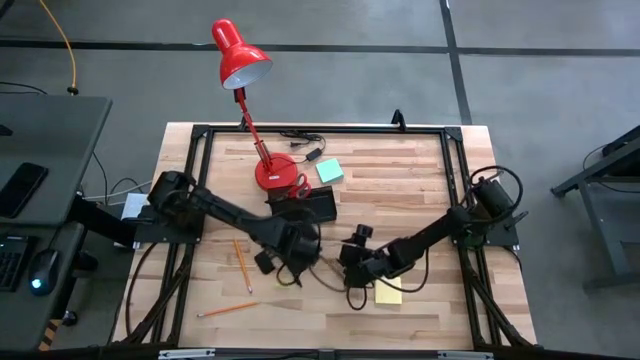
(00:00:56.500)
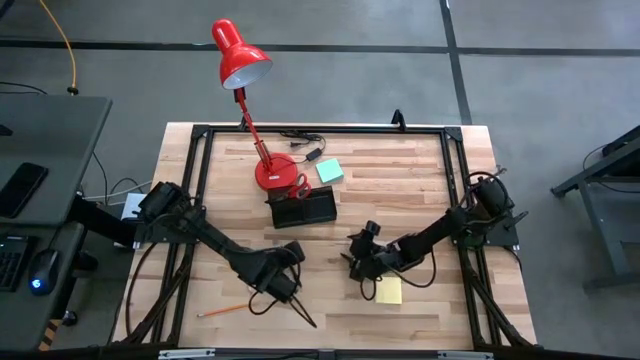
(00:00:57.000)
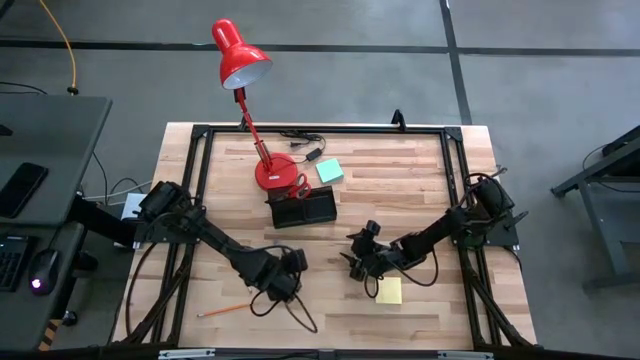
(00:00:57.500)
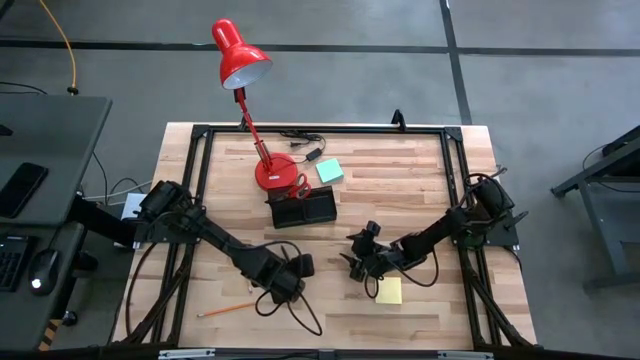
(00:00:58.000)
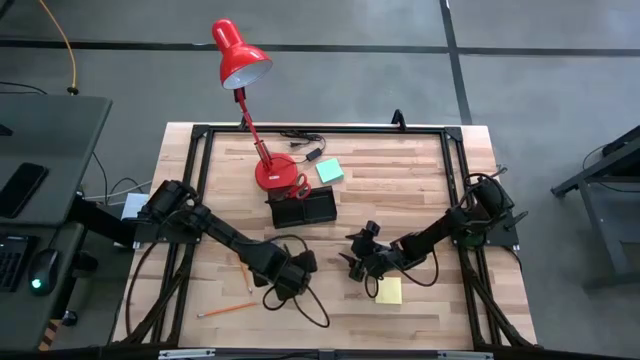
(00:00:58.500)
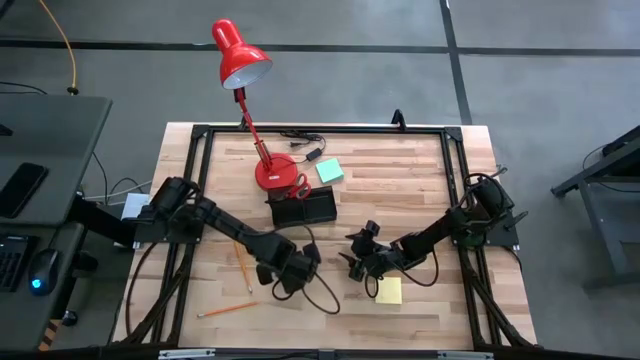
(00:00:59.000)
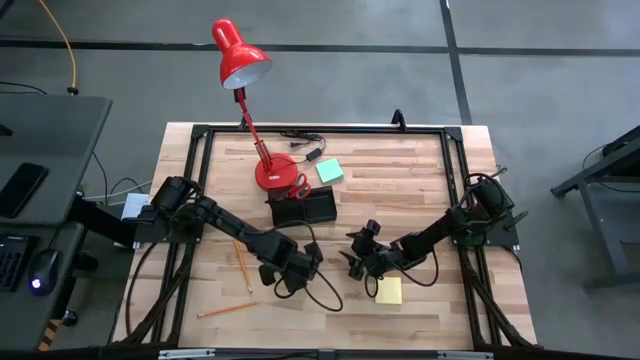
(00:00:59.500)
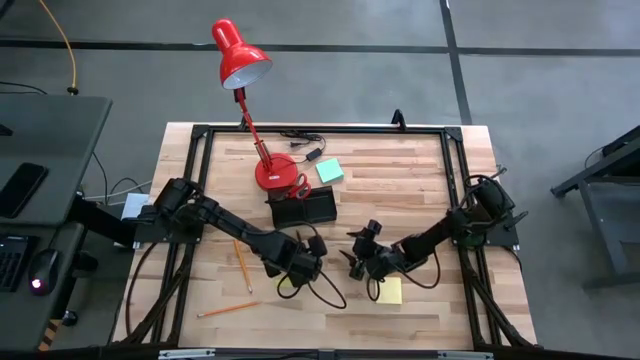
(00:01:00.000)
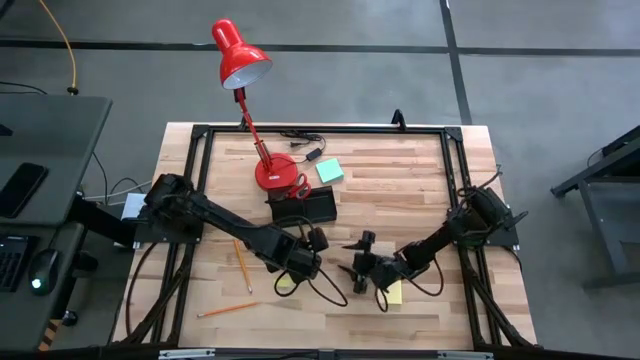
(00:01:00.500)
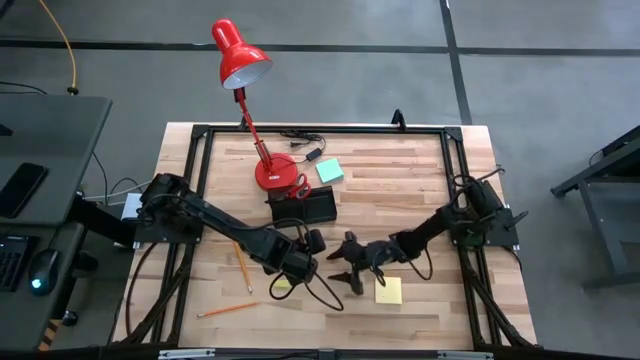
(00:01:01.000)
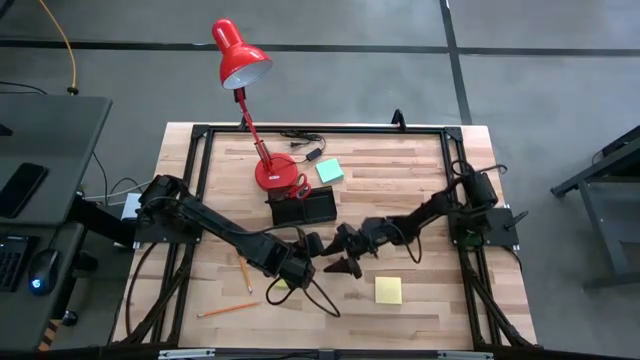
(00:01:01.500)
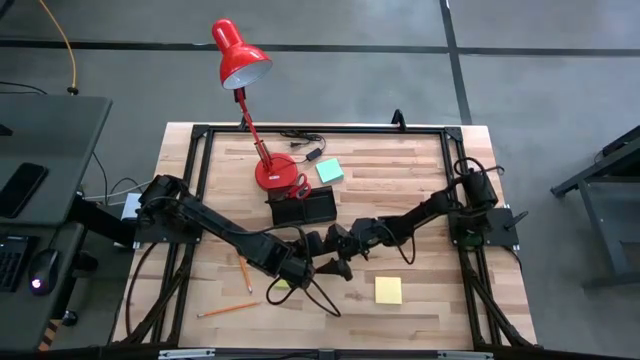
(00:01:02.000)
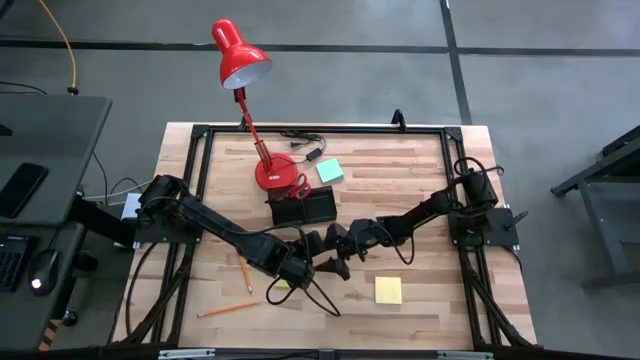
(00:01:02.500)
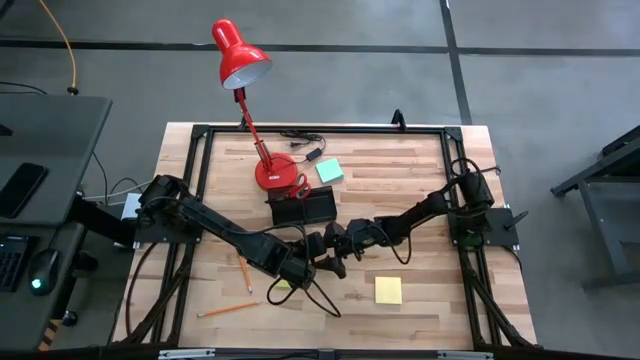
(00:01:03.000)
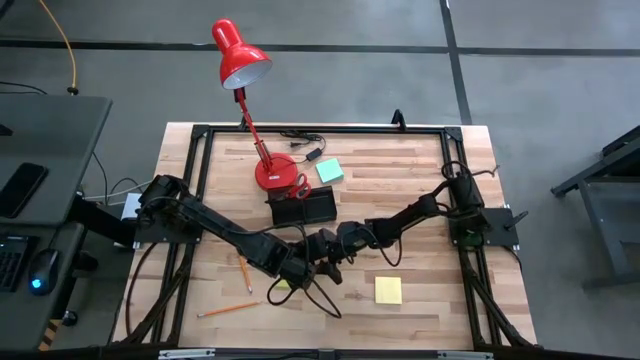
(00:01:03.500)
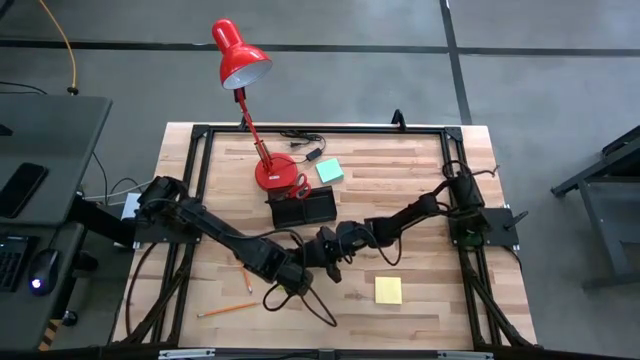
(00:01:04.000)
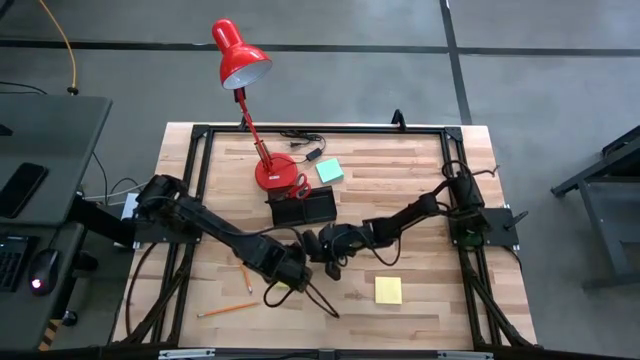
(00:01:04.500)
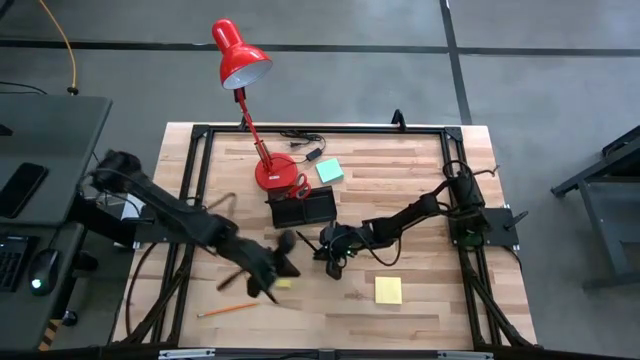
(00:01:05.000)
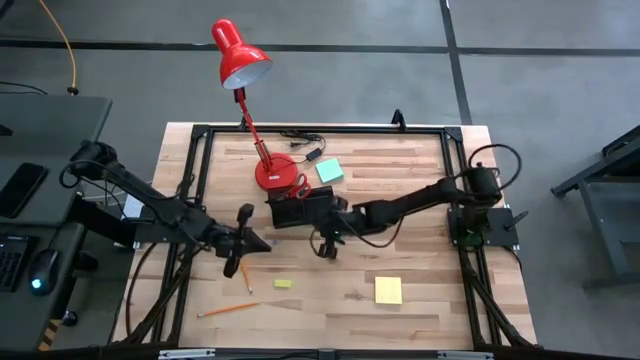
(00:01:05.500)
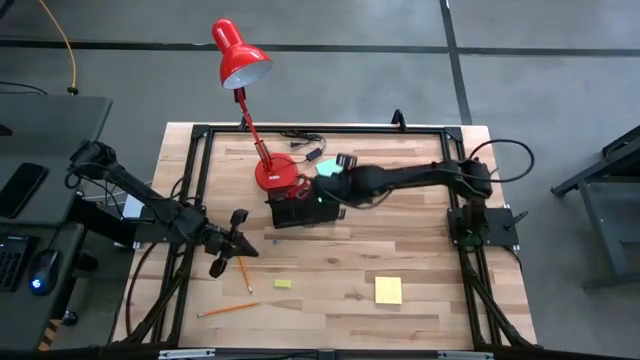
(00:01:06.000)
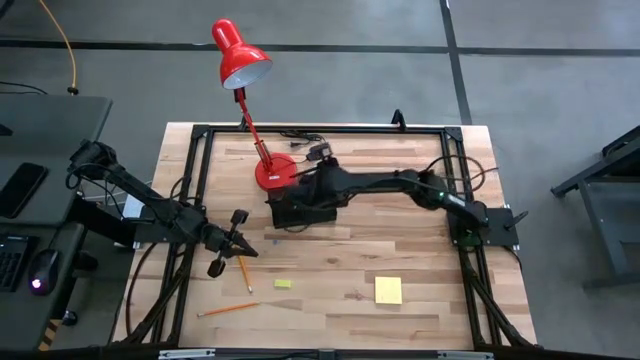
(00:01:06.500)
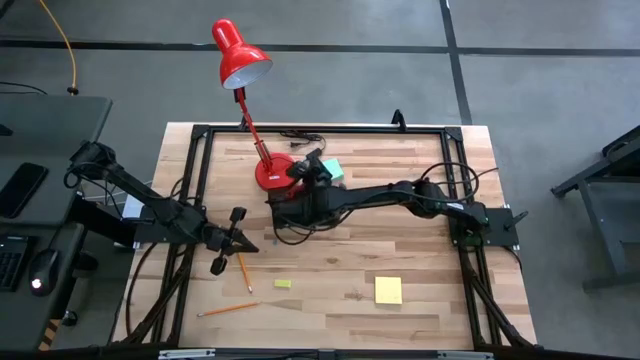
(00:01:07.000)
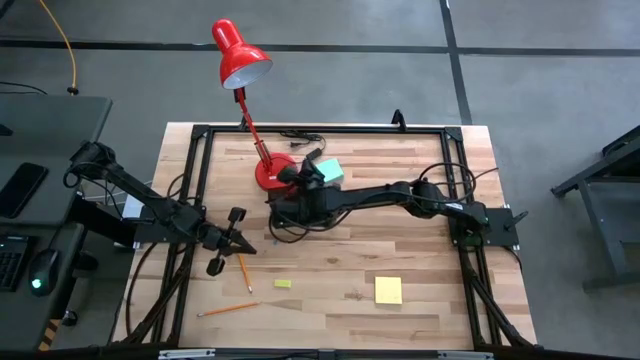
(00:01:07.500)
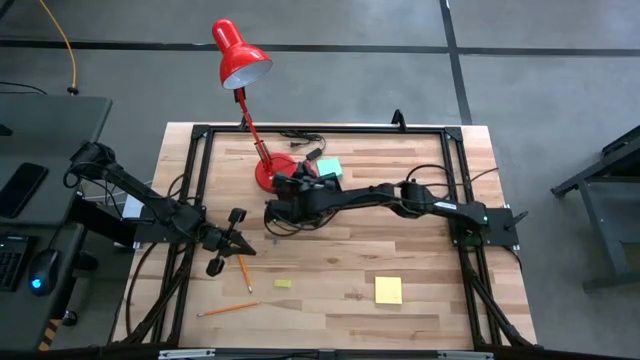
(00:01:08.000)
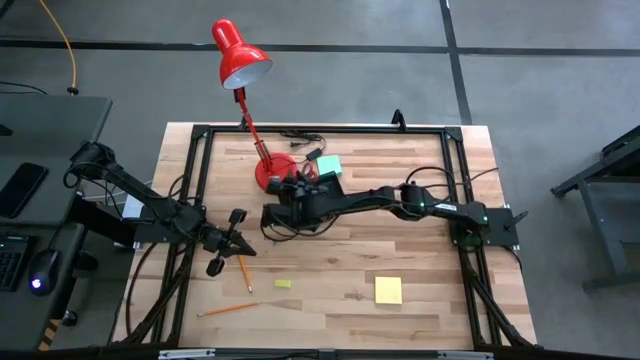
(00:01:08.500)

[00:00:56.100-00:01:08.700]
Task: Pick and place office supplies into organizer
Put the black pen in the desk organizer

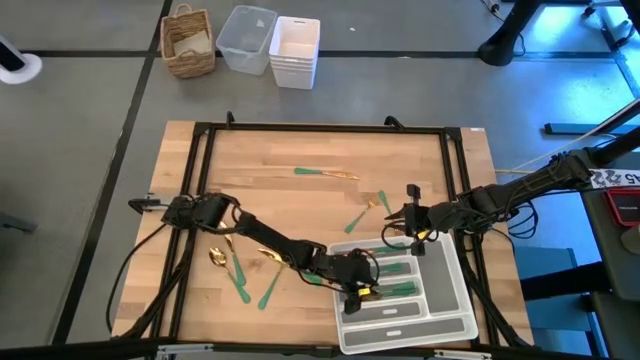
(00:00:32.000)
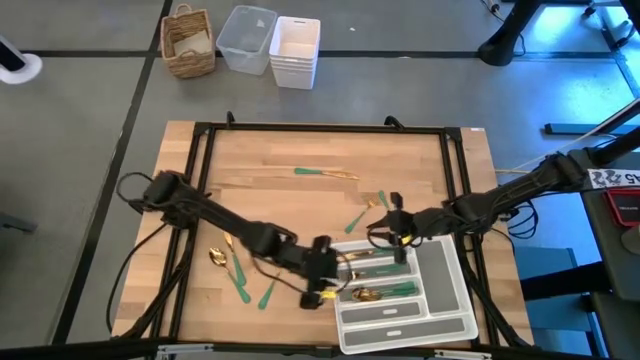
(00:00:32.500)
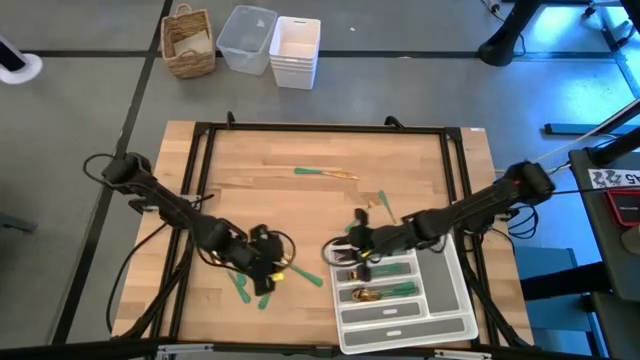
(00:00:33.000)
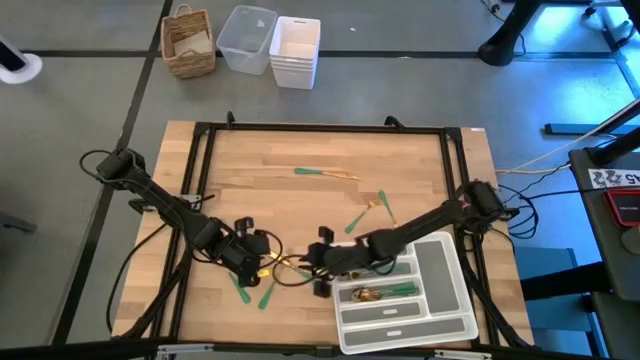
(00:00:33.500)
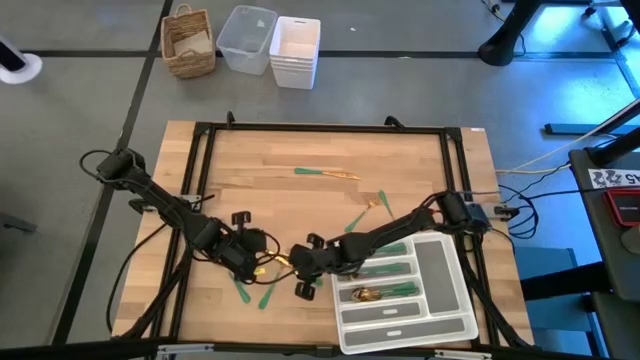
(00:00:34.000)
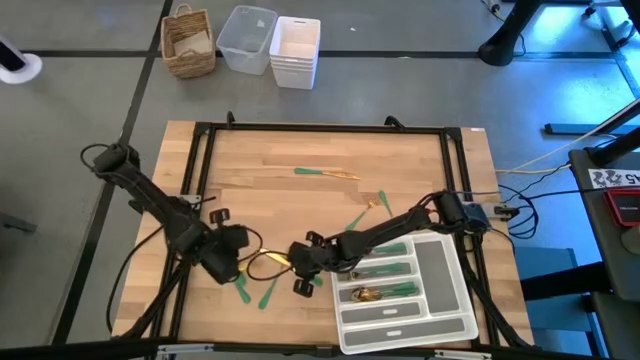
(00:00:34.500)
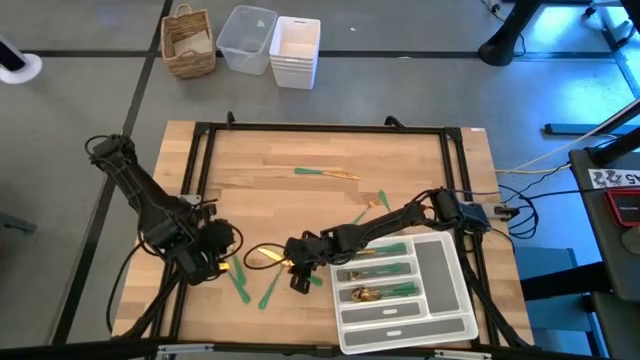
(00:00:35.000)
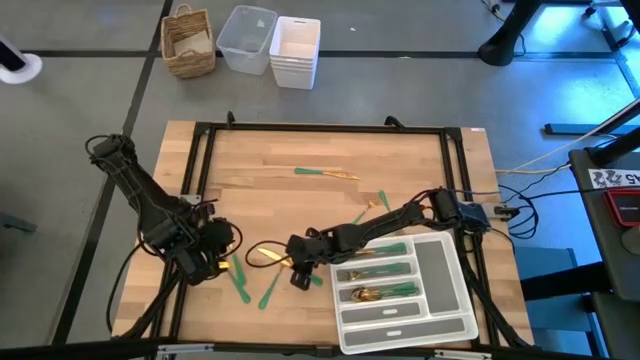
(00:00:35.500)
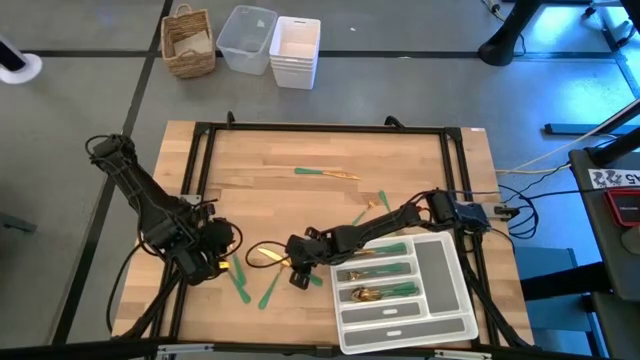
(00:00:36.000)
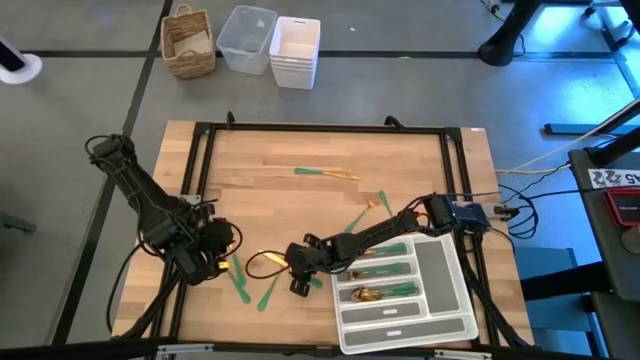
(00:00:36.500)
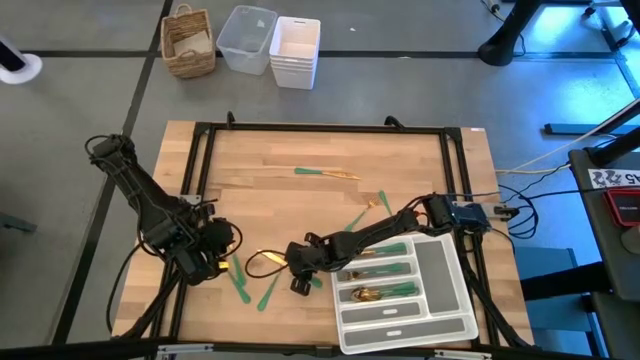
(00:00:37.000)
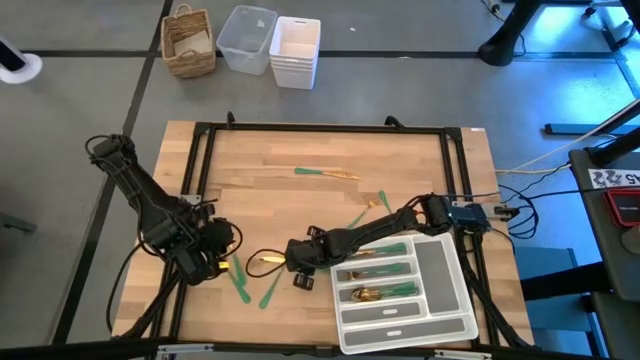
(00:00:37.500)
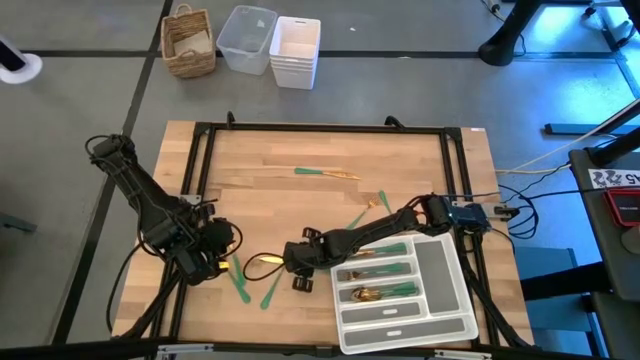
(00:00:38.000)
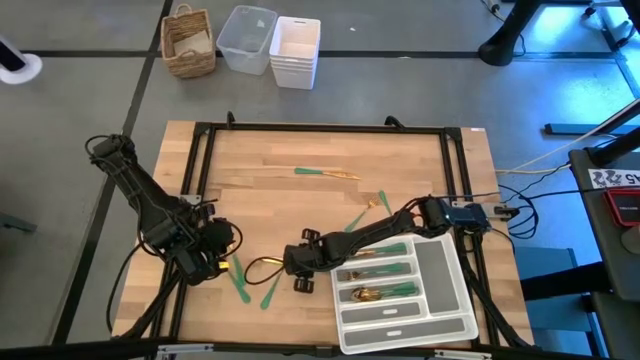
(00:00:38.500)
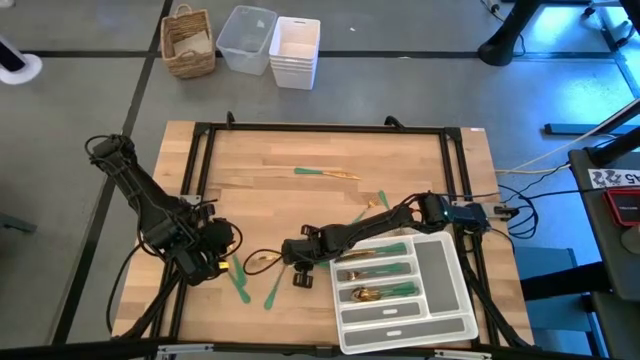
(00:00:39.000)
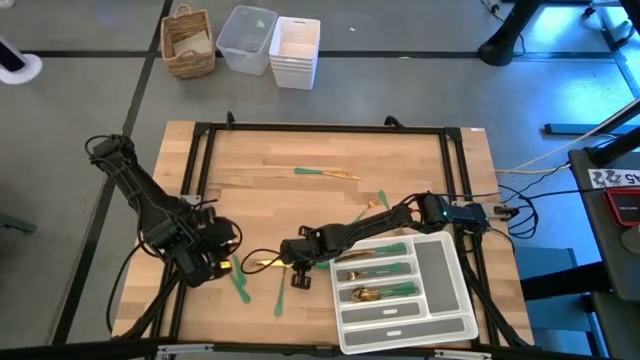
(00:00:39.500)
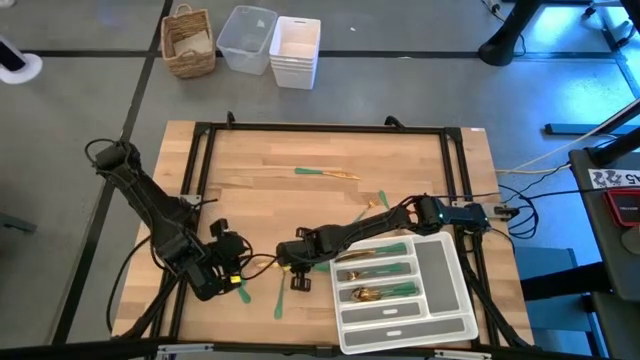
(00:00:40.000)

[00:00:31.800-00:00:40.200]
Task: Sort silverware
Put the bottom right green table knife into the silverware tray
